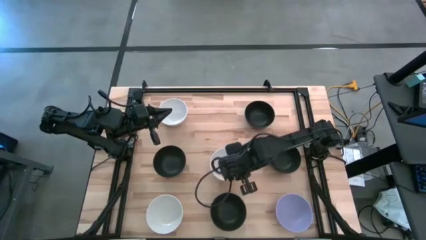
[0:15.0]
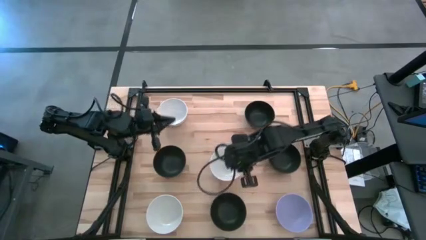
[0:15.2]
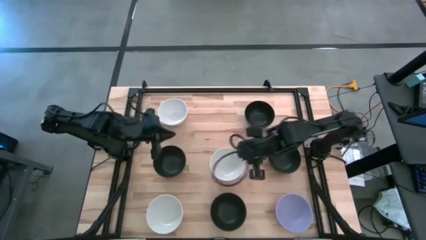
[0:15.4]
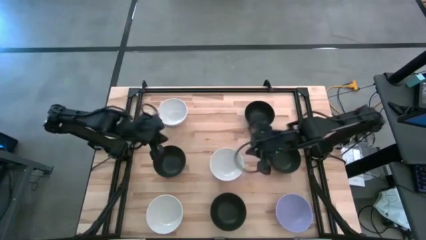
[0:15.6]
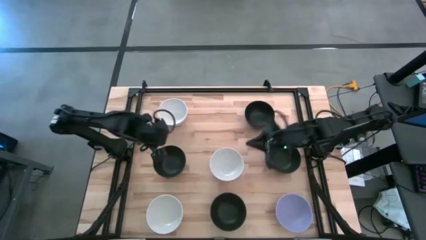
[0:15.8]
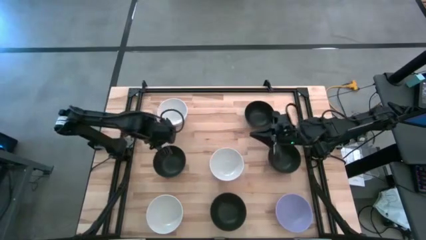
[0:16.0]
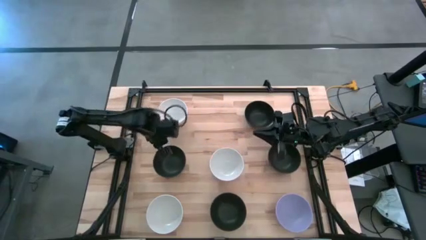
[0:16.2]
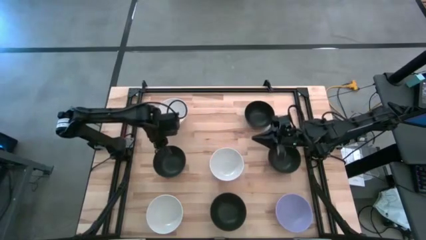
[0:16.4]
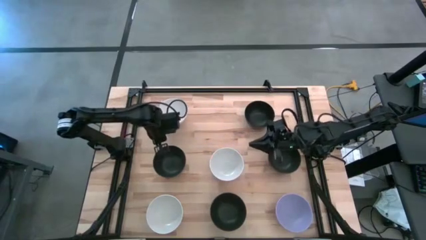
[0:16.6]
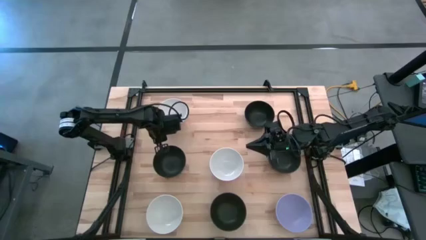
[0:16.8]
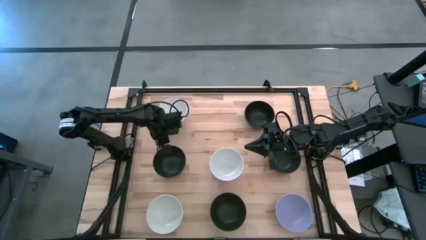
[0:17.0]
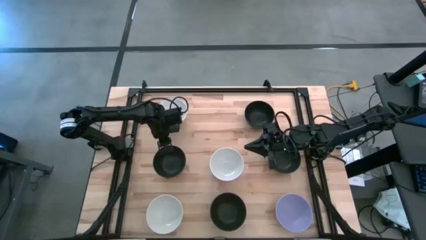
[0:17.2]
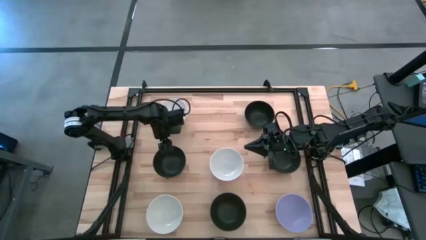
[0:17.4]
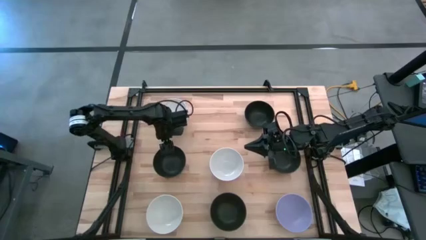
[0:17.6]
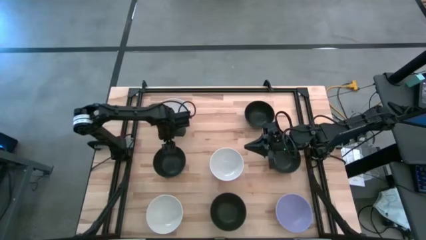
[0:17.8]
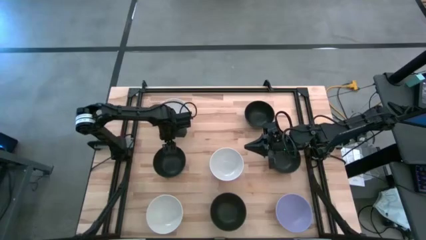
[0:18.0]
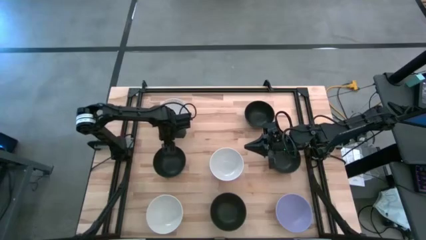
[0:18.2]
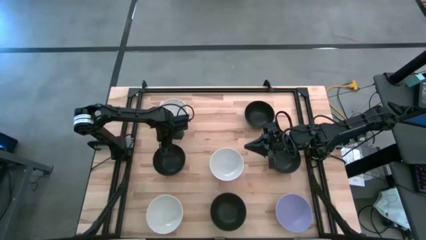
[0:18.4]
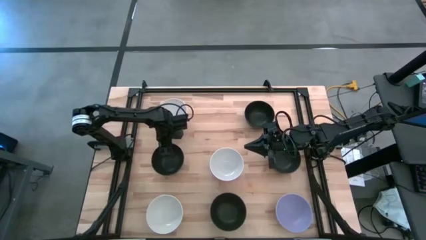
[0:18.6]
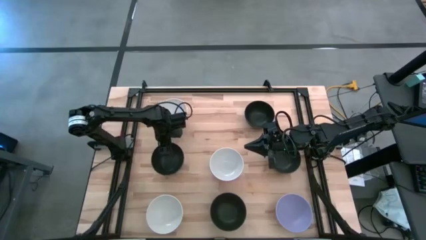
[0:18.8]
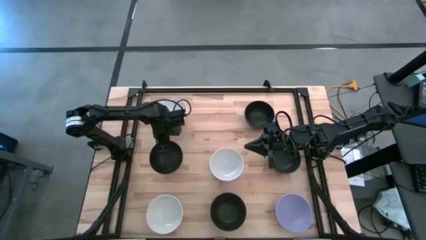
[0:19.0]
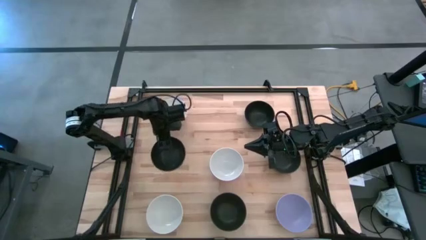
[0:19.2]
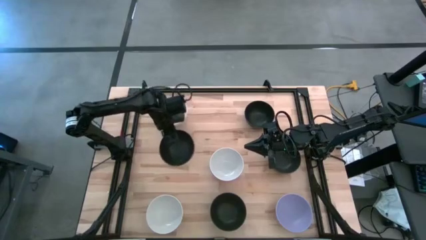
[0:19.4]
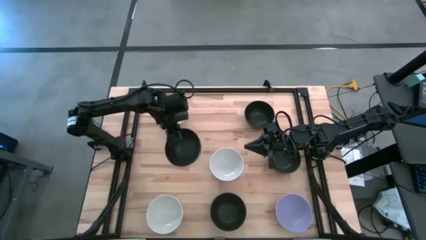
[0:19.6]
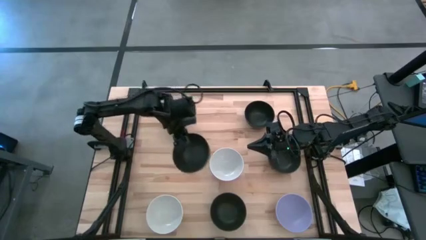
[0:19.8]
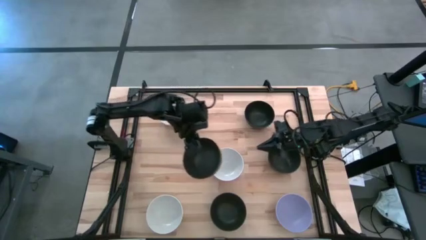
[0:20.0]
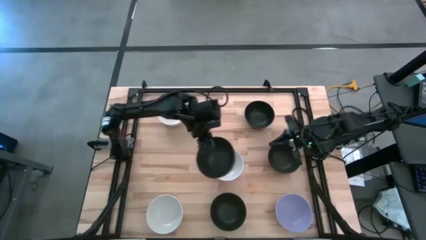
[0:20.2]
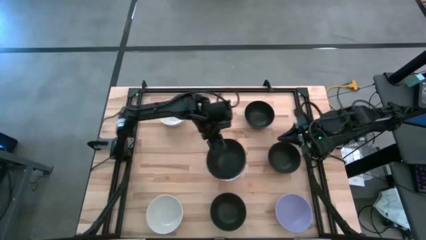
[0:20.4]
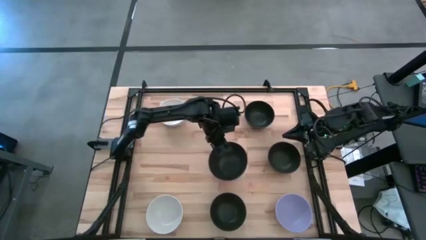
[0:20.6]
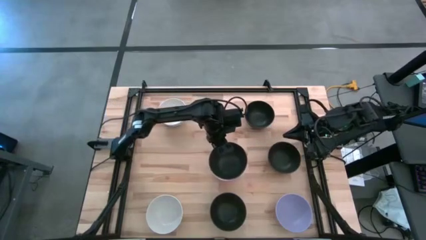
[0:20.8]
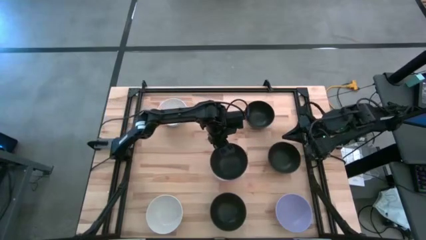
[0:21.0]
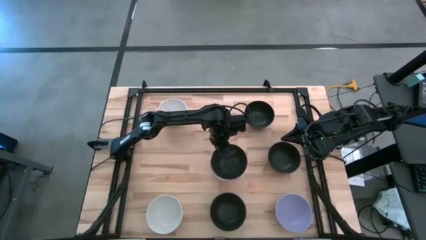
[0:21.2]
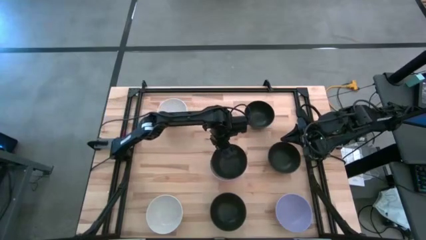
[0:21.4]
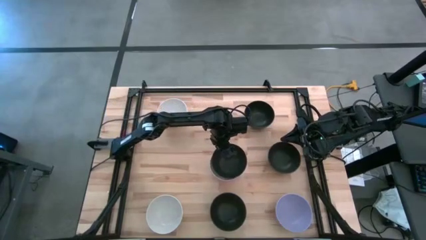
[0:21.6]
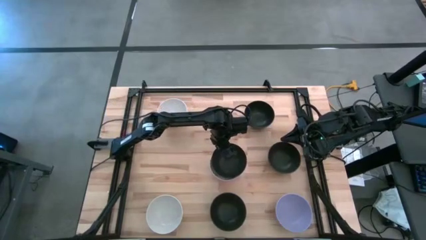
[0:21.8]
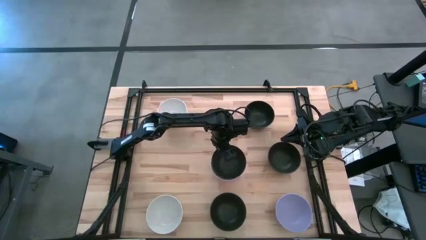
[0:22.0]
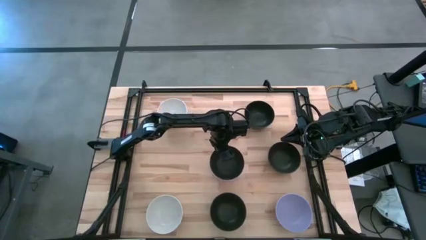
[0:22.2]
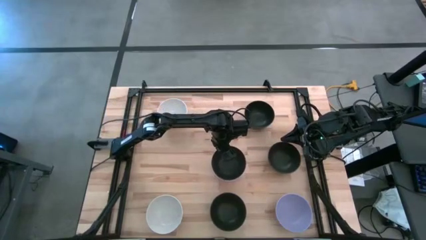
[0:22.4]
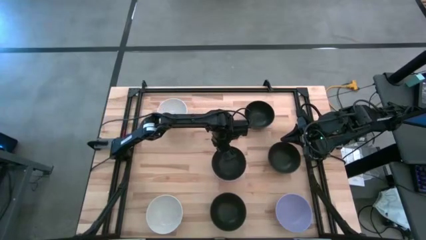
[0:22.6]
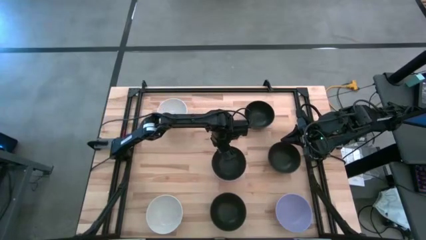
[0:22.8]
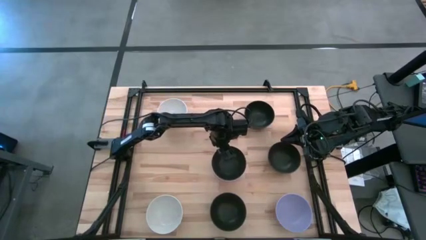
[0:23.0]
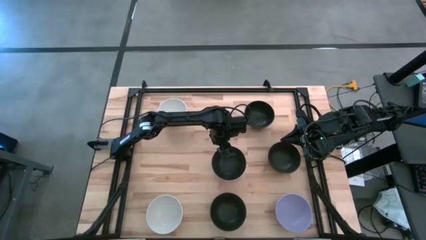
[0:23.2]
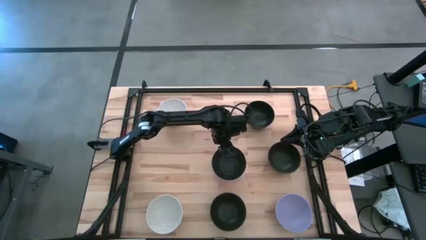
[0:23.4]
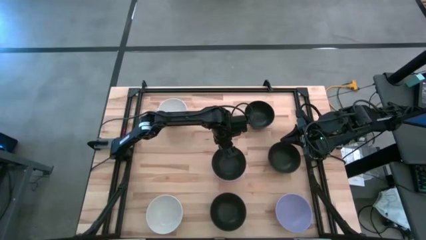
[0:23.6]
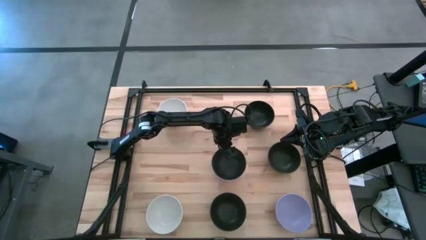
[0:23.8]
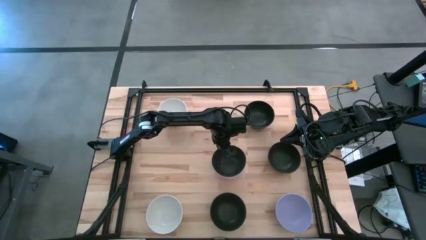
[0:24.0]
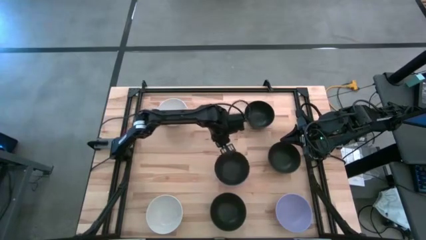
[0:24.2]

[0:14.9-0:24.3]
Task: Nest bowls inside each other
Stack the black bowl on top of the white bowl

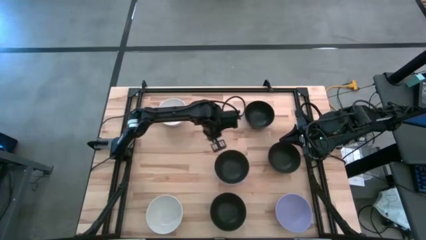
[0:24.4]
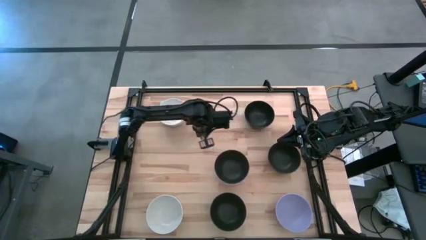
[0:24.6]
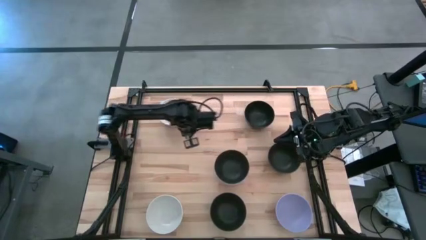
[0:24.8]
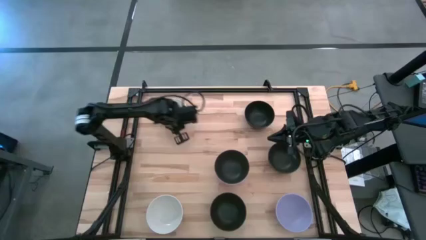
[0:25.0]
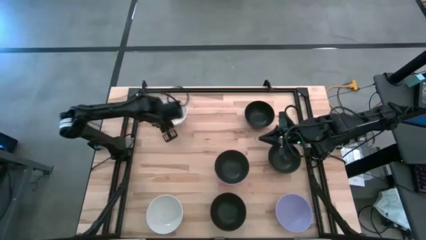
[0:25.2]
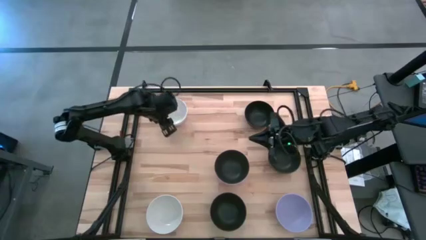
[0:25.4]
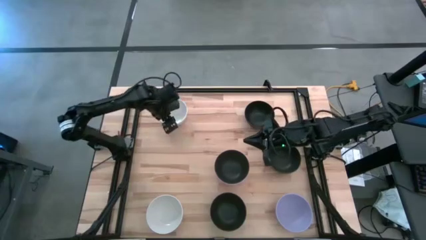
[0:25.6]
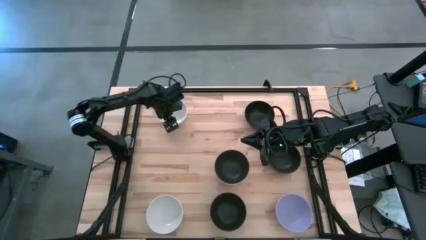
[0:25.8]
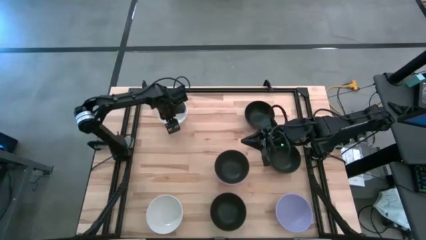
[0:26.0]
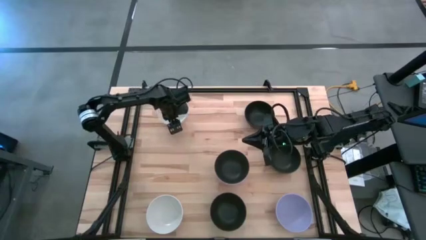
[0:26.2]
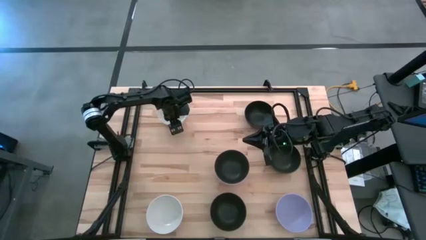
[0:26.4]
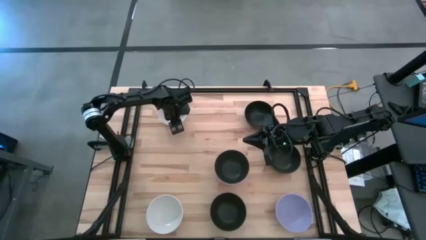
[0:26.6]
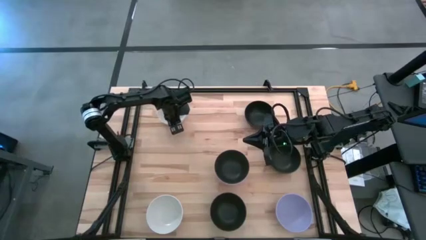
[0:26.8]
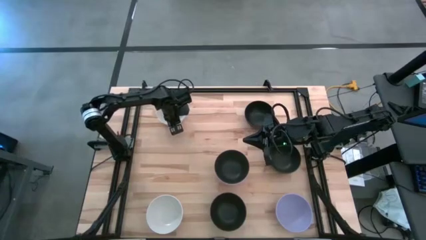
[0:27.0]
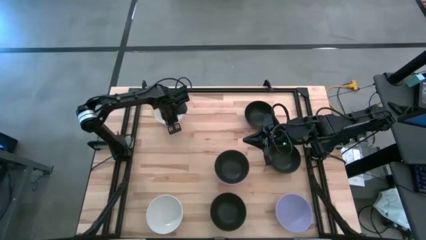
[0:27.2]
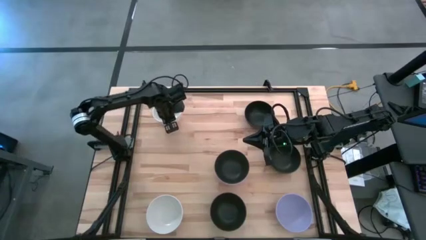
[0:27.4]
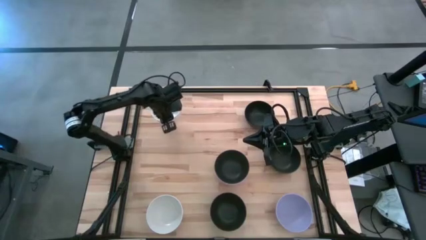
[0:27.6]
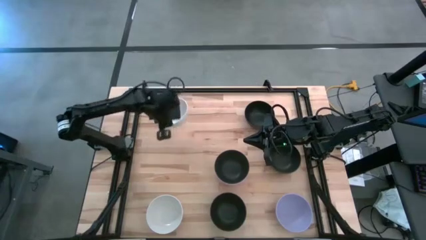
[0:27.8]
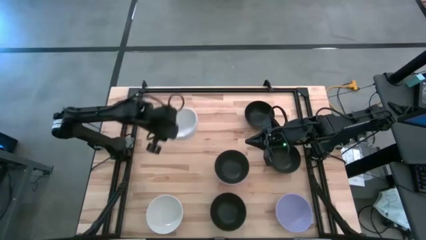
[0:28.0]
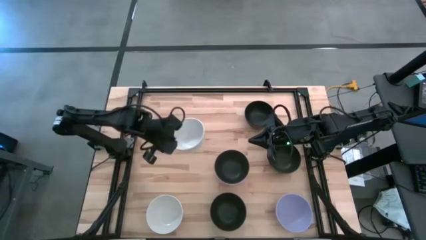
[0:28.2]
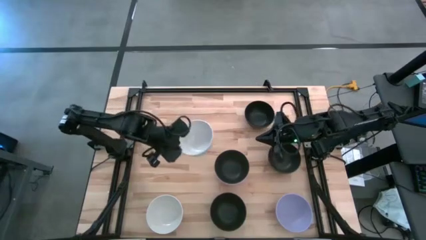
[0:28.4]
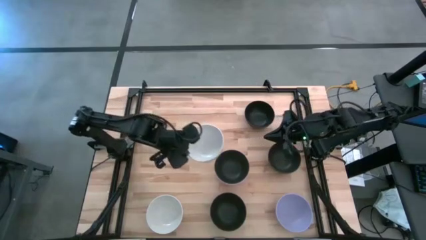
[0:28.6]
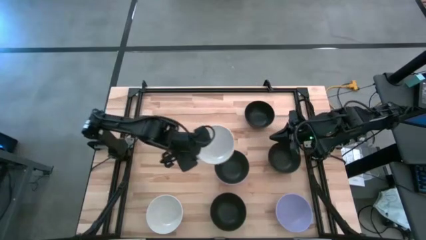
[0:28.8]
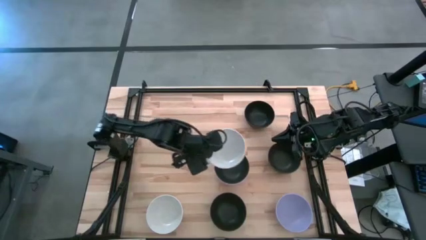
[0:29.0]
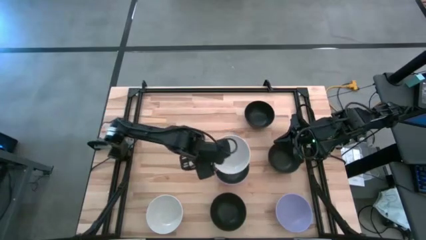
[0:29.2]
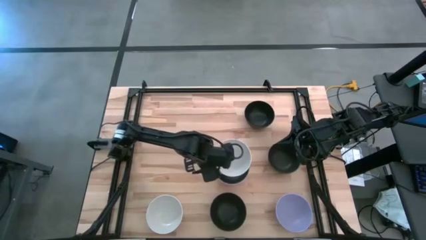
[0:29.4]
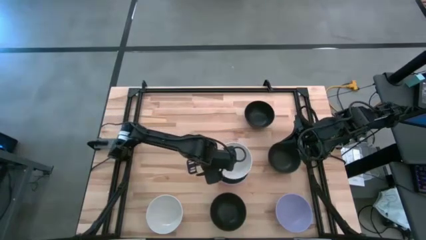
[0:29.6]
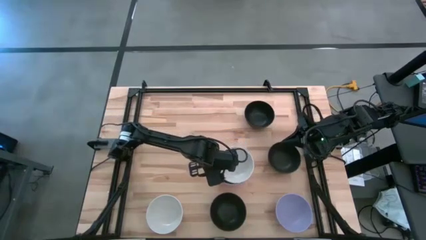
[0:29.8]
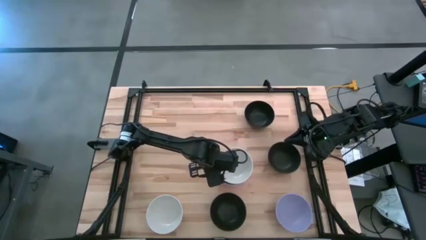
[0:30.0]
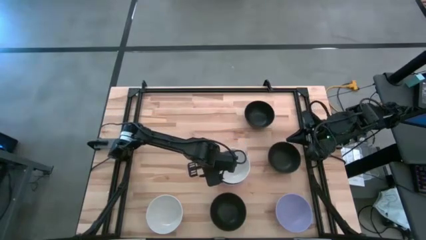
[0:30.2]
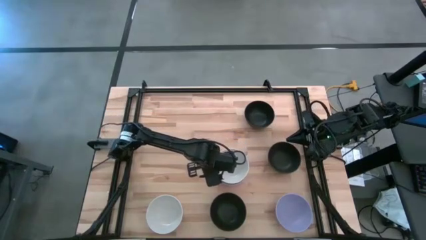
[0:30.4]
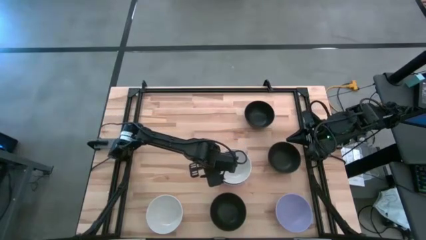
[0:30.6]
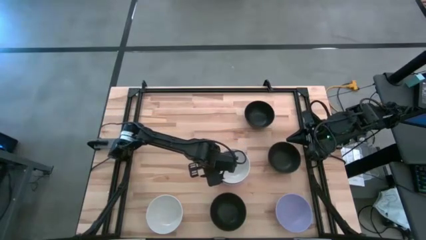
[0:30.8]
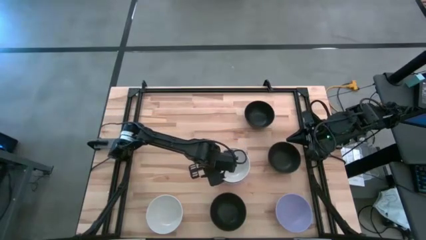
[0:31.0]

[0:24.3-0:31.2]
Stack the top white bowl on top of the black bowl
